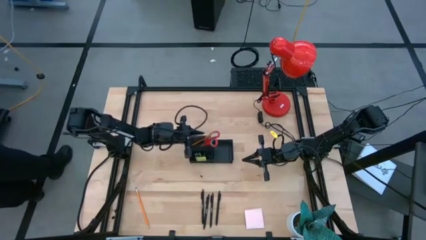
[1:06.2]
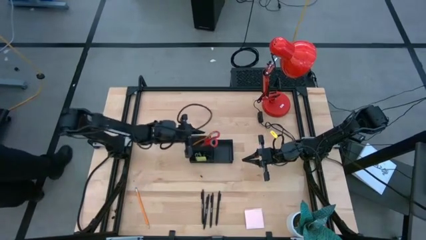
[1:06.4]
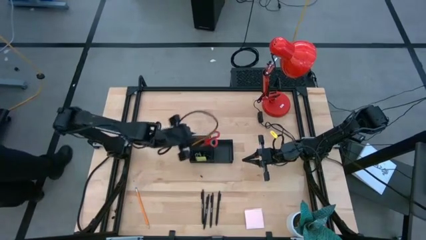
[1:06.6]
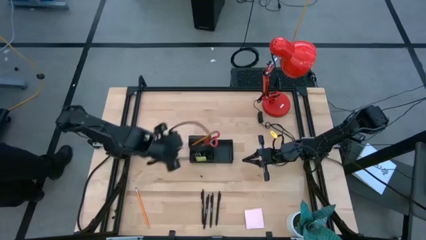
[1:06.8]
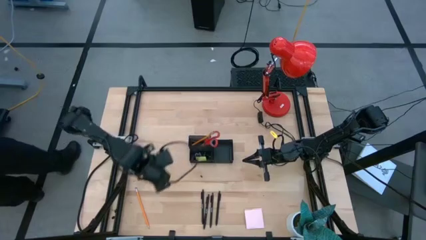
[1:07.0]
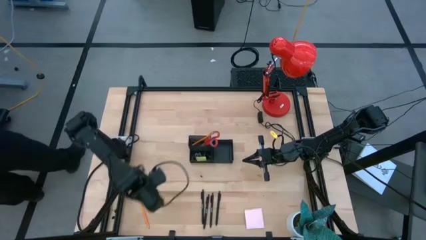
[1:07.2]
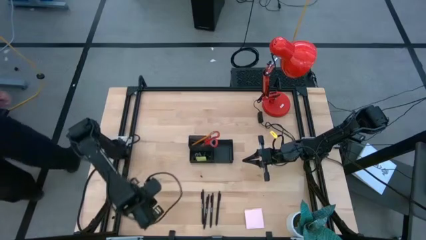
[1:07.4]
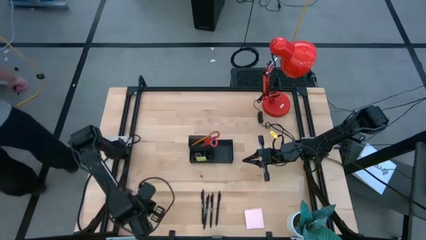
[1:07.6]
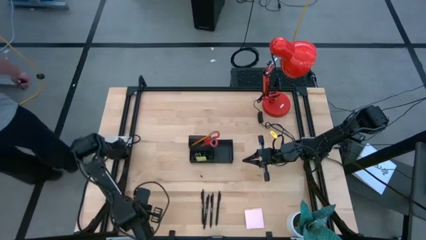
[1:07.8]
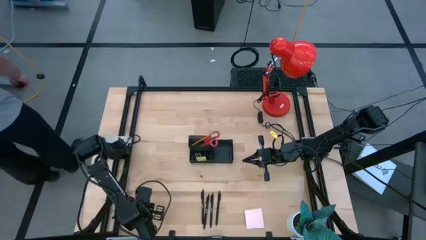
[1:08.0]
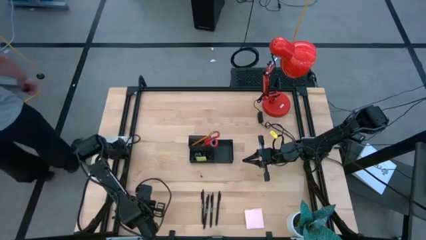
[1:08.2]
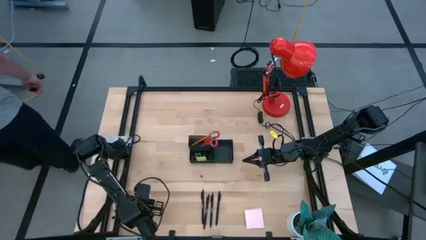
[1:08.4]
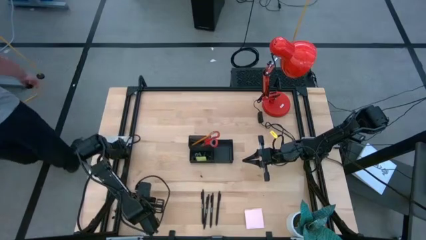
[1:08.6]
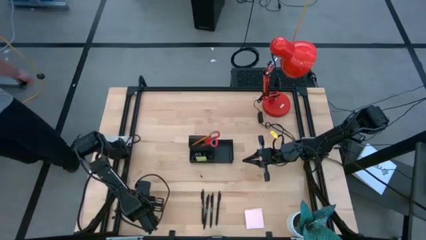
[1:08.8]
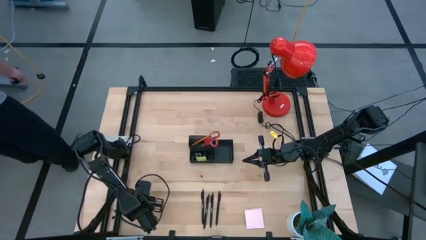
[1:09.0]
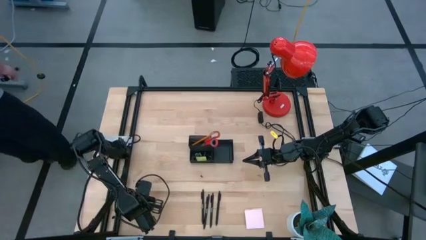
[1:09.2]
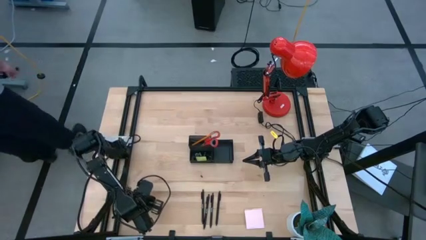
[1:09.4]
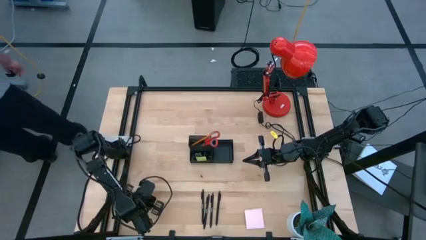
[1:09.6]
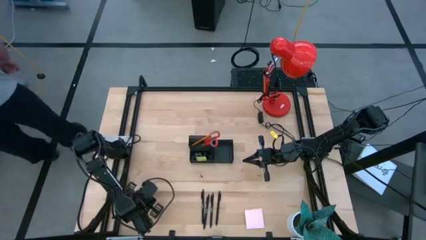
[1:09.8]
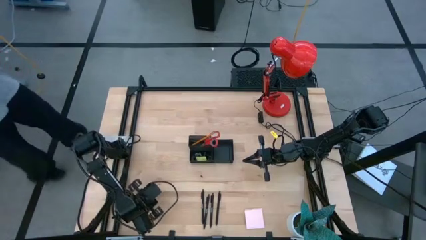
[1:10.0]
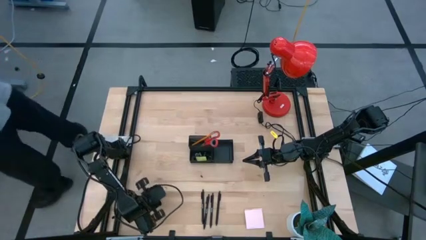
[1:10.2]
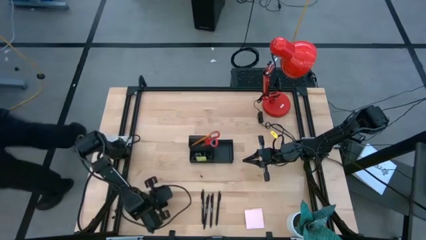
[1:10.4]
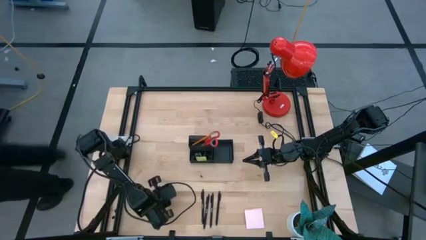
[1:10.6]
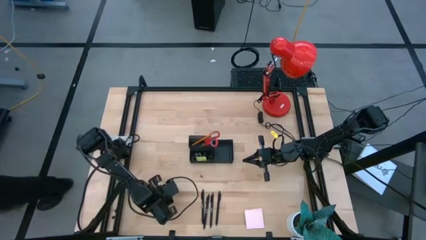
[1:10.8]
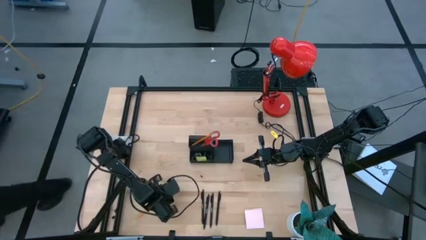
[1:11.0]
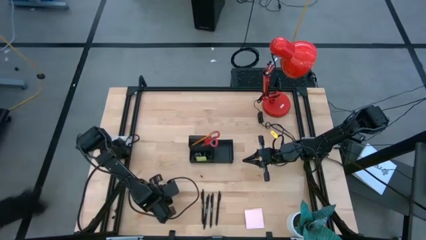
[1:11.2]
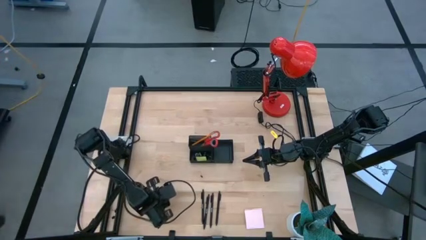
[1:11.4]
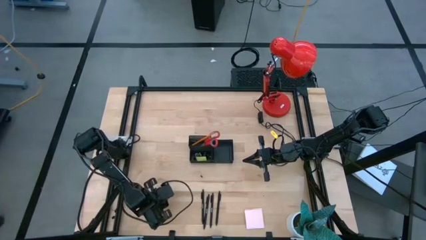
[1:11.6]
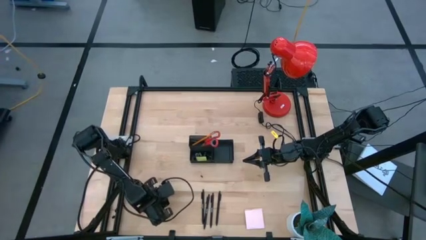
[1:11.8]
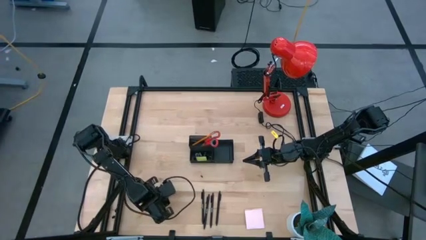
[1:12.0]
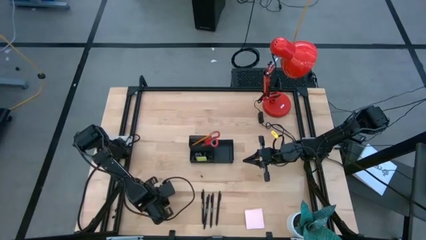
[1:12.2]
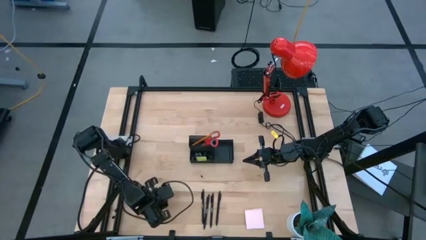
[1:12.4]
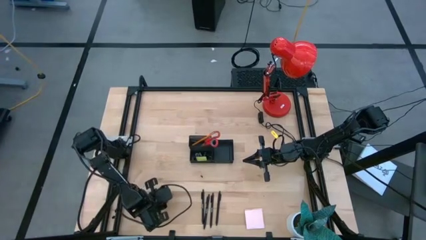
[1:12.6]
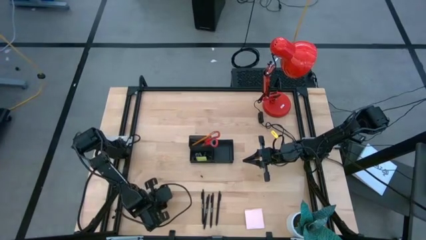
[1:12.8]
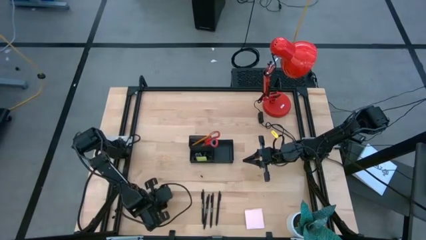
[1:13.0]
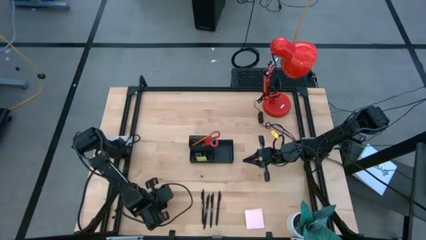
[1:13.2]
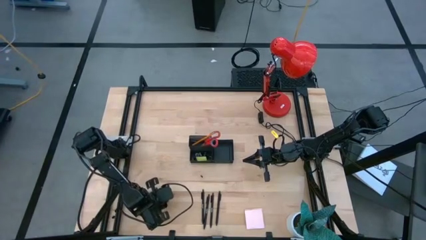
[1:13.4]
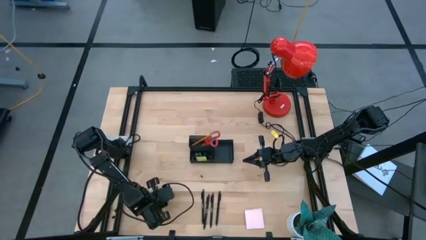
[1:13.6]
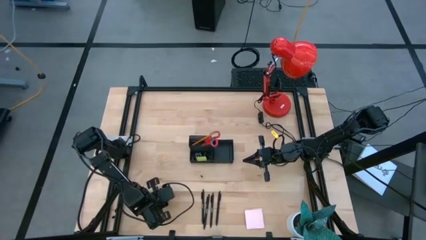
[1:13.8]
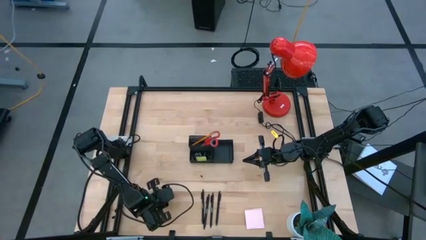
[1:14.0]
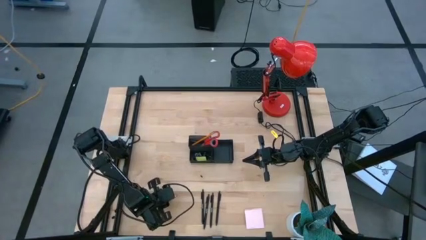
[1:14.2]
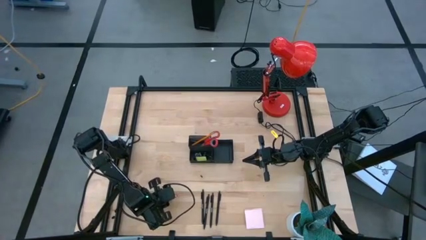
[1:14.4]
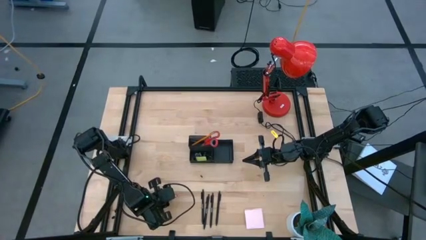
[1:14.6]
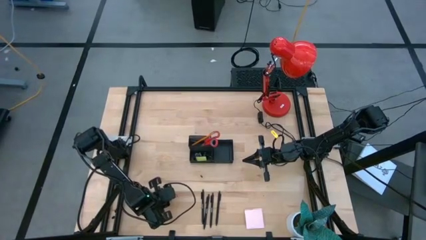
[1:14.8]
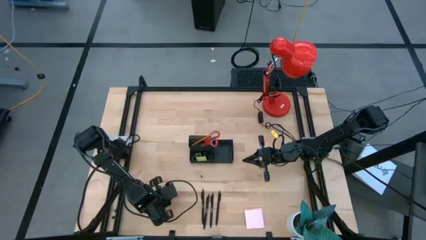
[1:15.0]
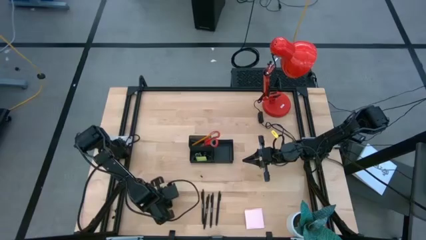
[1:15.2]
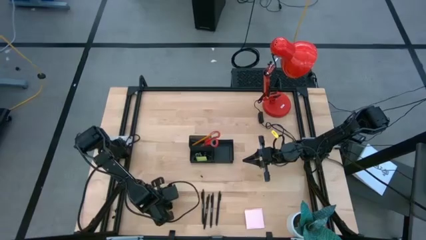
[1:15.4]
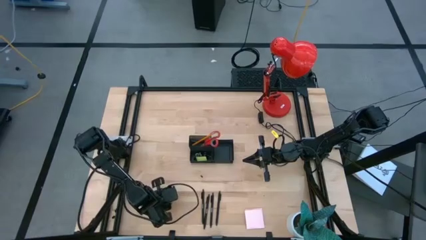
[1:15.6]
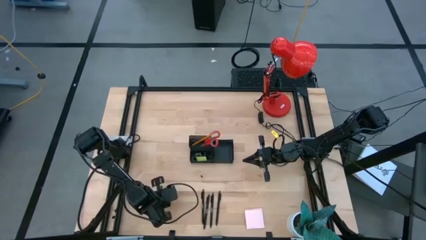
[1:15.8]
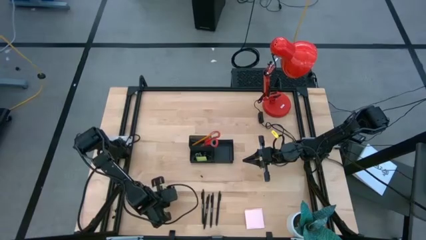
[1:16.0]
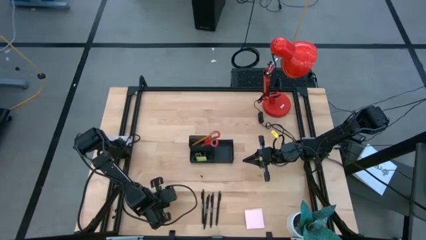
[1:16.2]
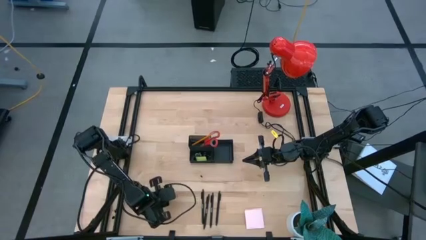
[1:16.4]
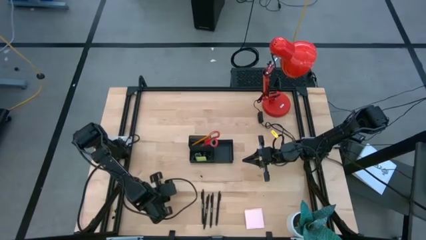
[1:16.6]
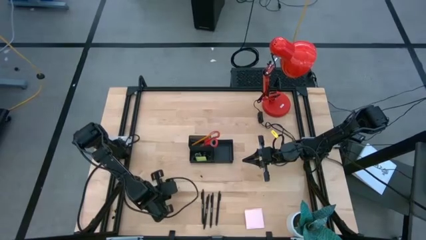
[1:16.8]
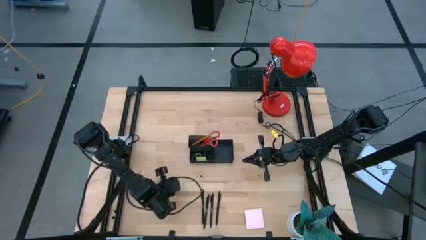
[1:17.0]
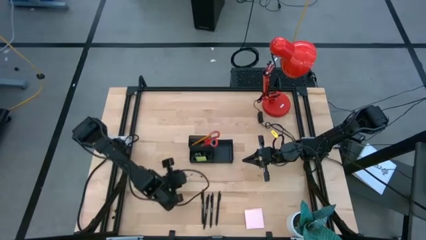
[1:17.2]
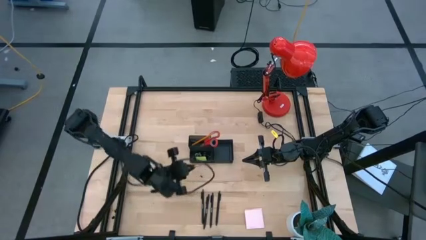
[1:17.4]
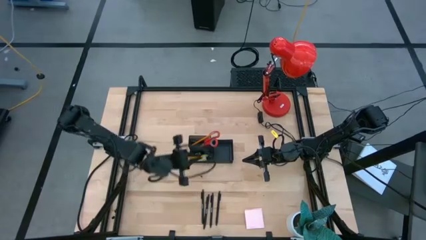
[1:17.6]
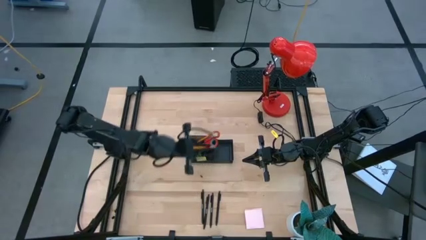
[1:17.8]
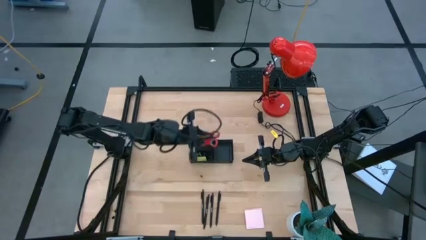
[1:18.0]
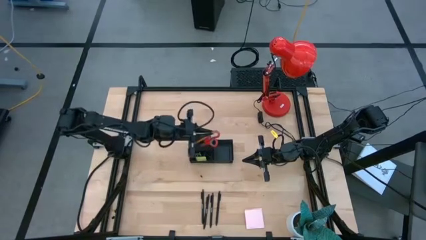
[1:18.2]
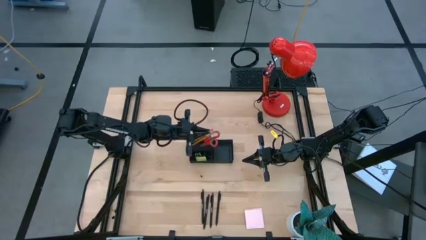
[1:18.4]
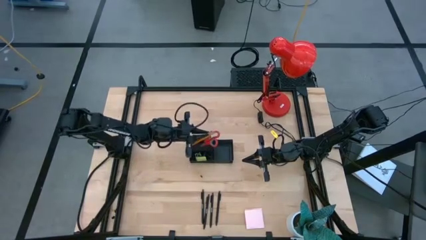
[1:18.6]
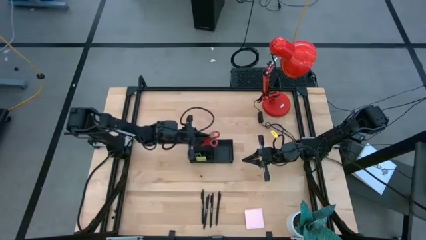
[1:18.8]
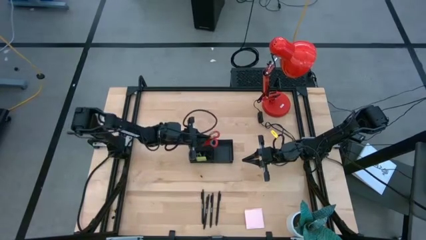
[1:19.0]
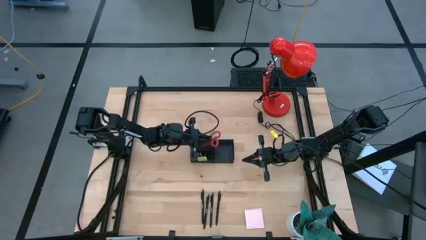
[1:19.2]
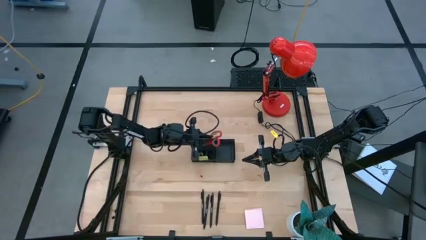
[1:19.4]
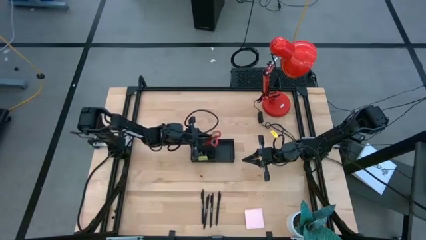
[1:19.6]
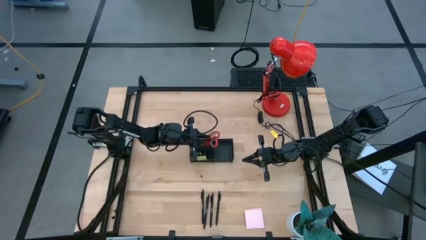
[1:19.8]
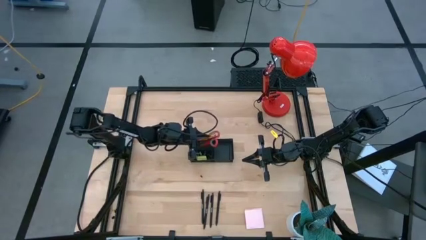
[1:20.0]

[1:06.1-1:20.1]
Task: Pick and place office supplies into organizer
Put the orange pencil into the black desk organizer

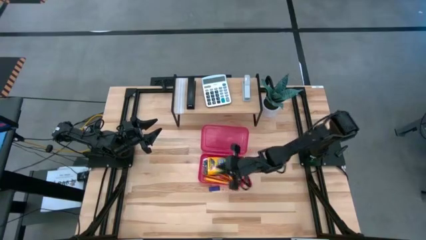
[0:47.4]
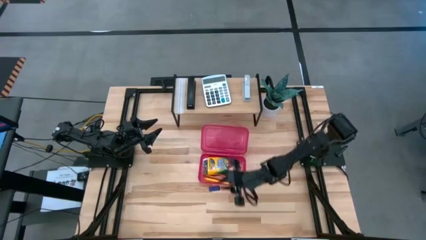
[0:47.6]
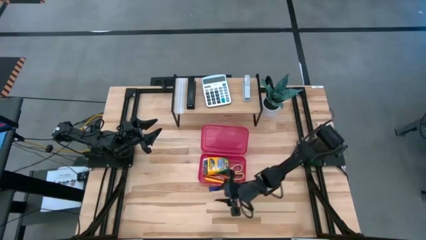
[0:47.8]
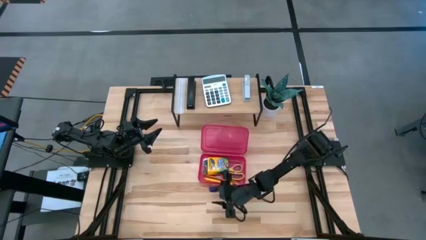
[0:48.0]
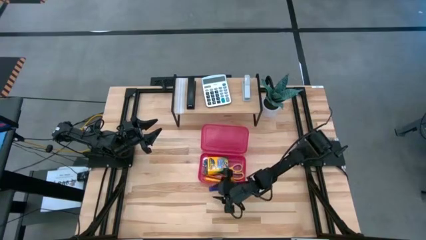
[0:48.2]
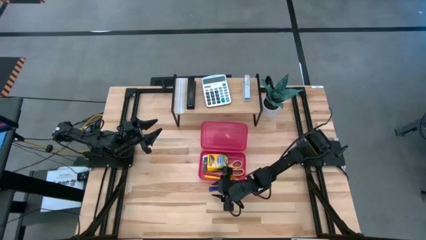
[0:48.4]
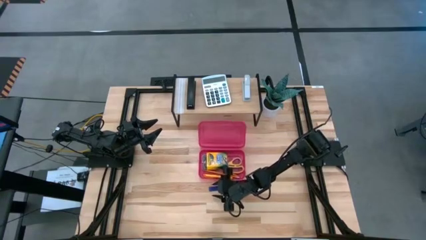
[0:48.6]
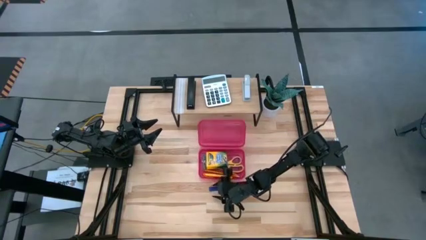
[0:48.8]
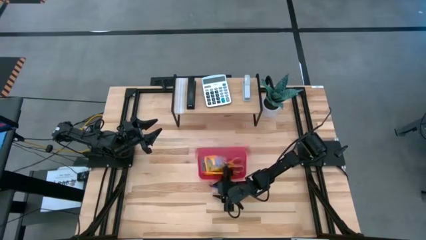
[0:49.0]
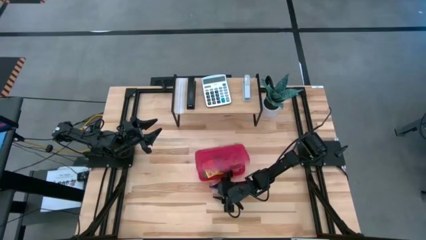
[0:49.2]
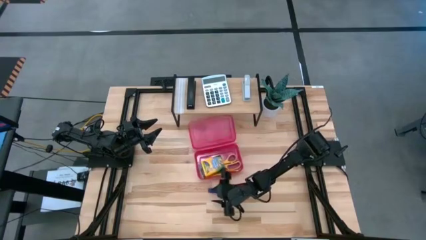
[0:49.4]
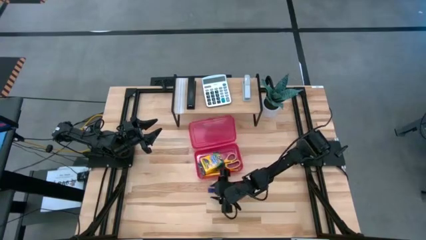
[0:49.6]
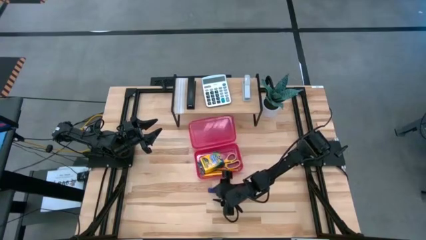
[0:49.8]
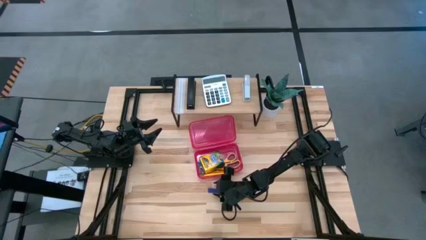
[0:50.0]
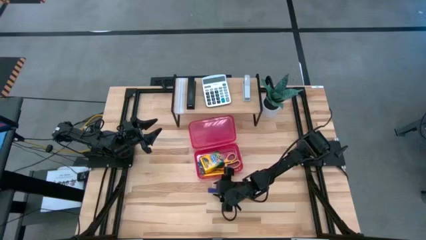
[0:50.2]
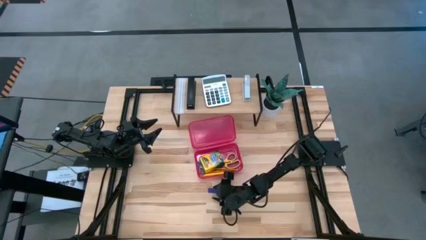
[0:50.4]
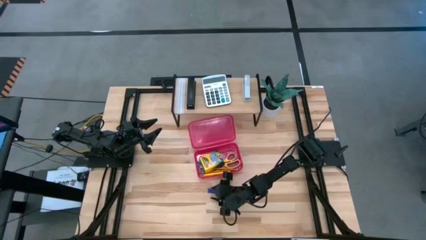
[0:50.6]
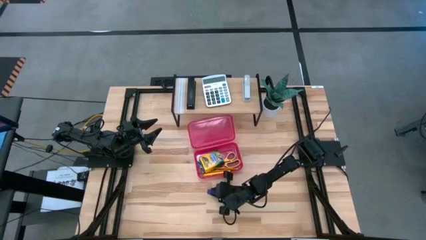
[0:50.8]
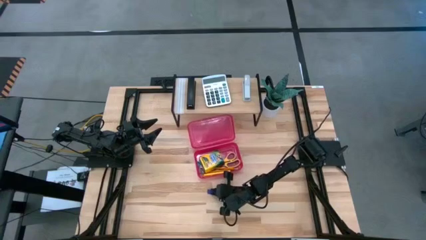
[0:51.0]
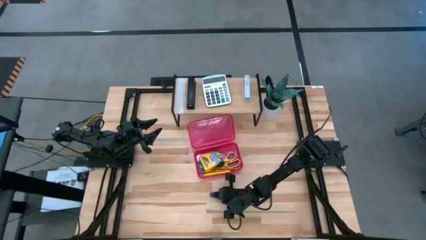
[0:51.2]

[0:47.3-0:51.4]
Task: Pack school essentials
Put the blue eraser into the red supply box
